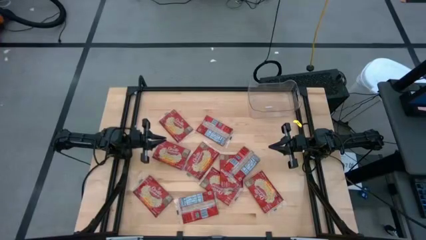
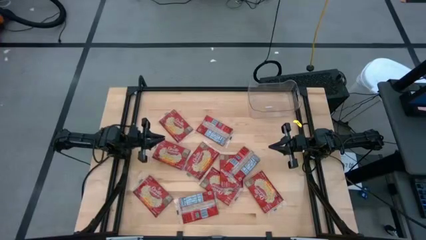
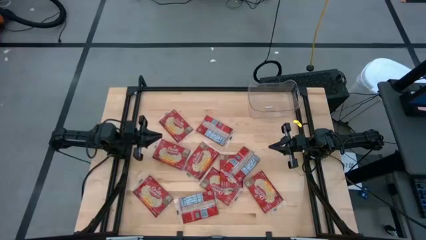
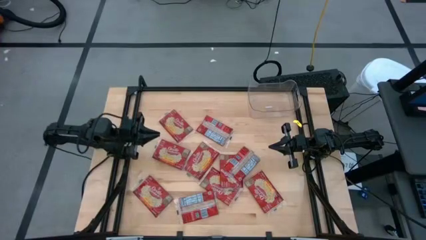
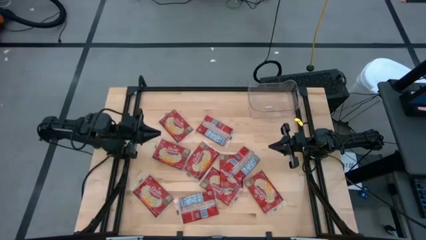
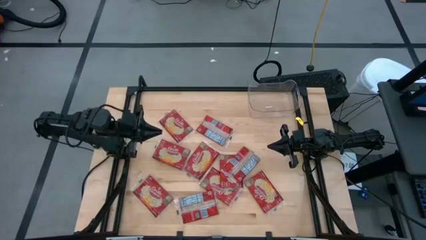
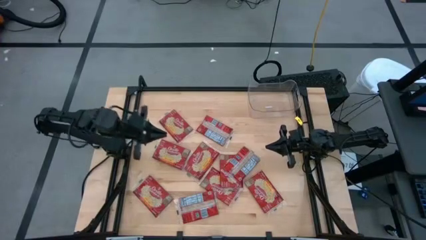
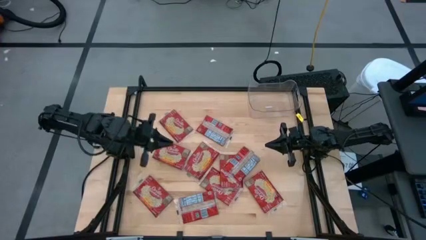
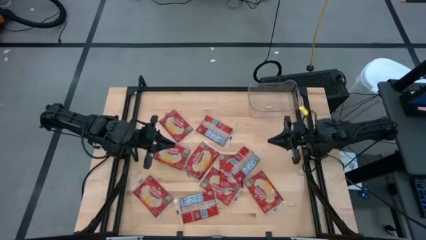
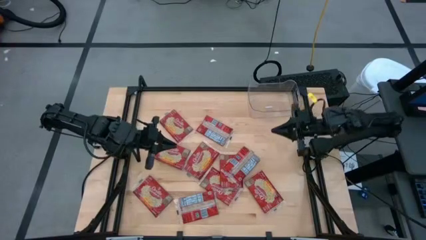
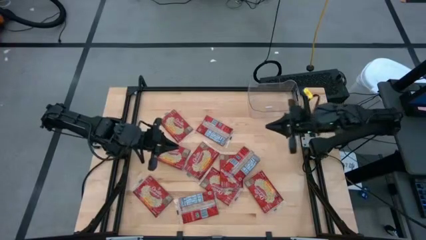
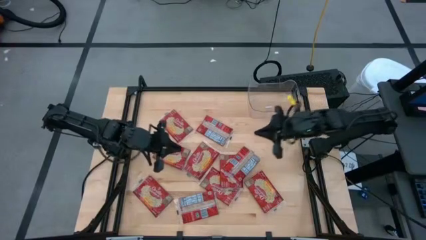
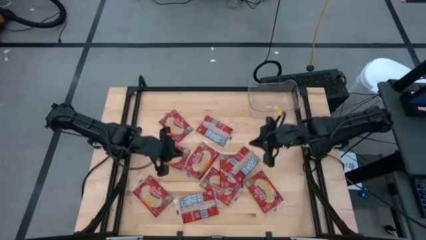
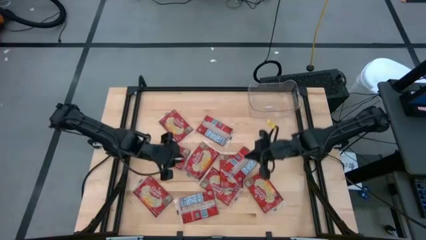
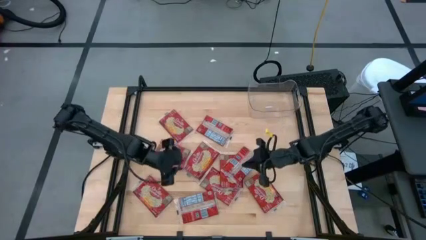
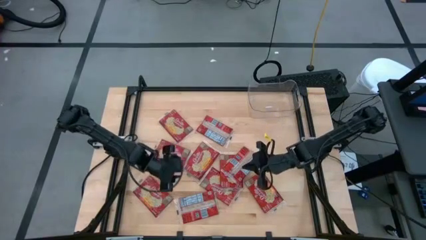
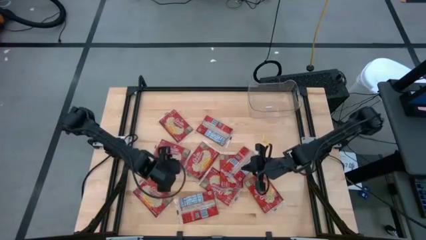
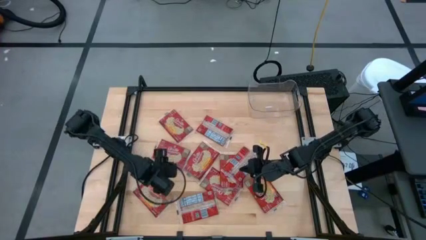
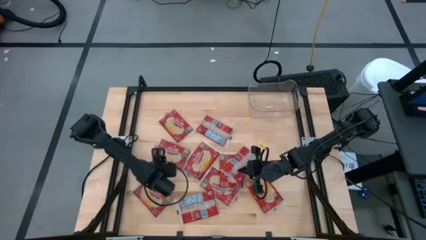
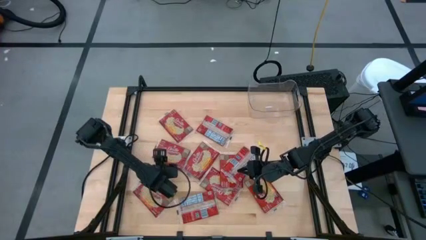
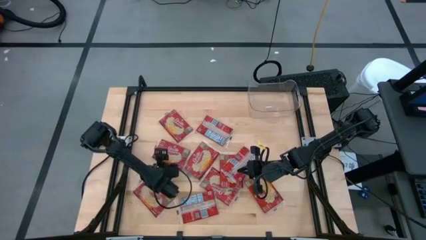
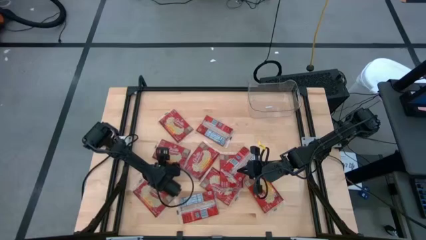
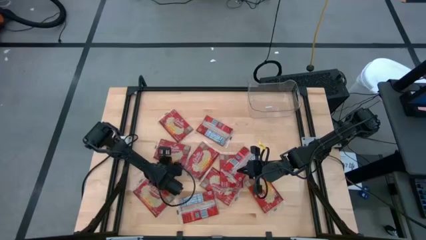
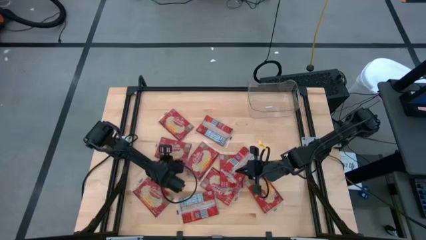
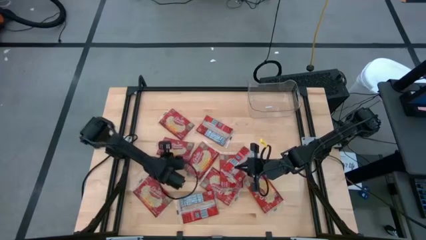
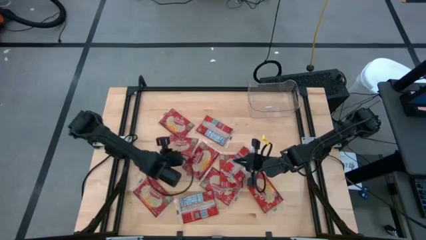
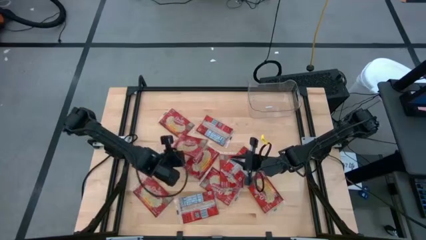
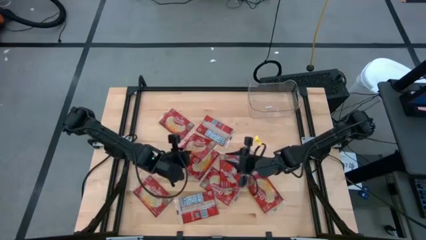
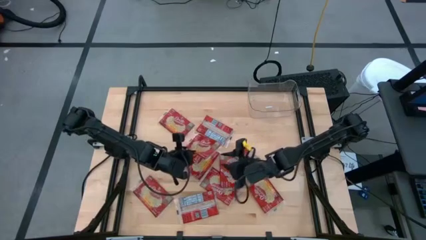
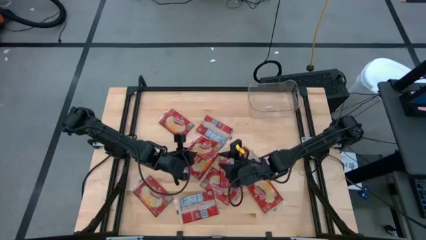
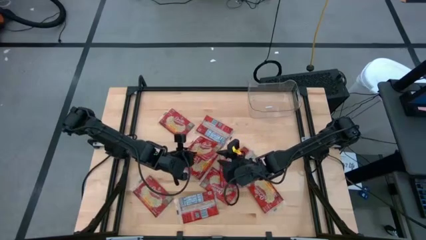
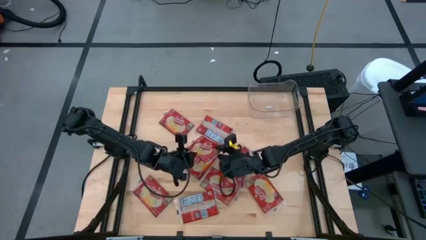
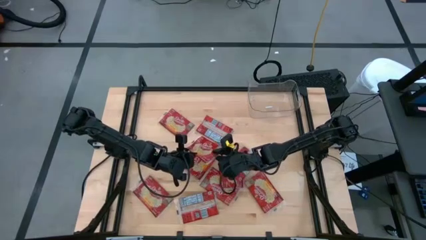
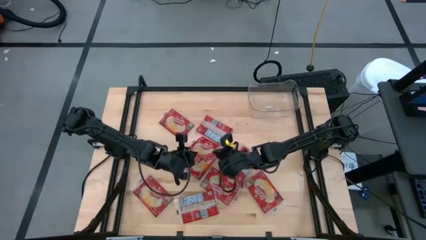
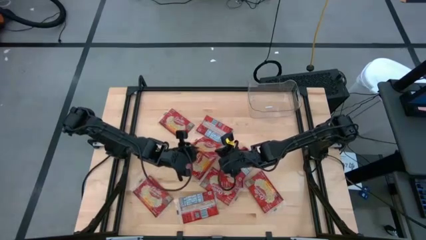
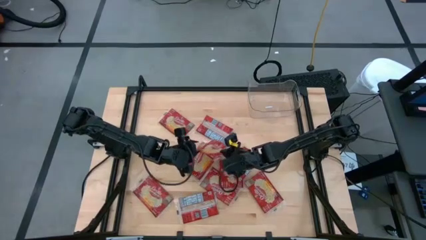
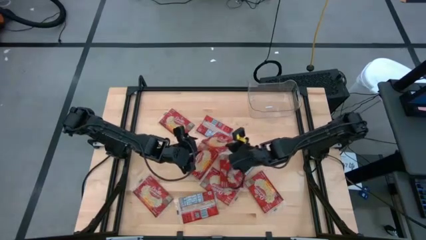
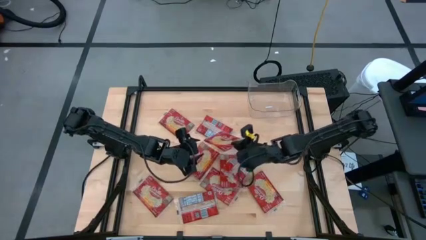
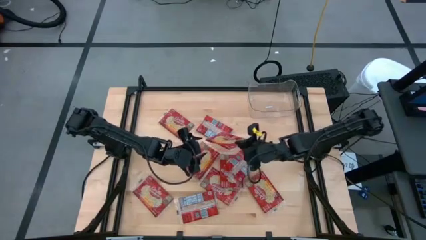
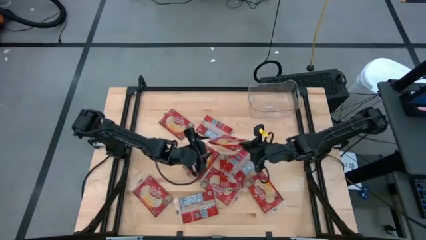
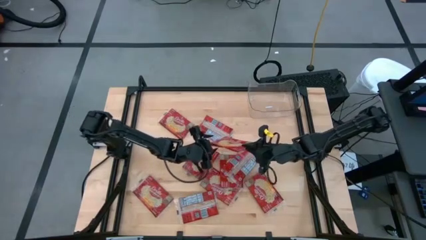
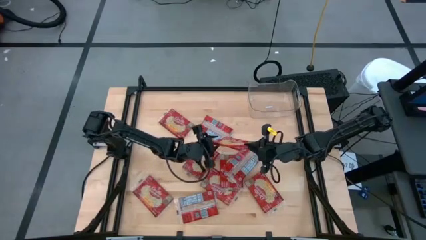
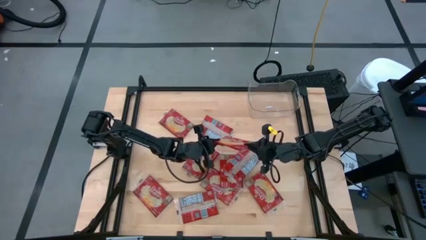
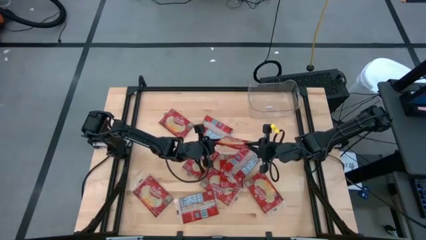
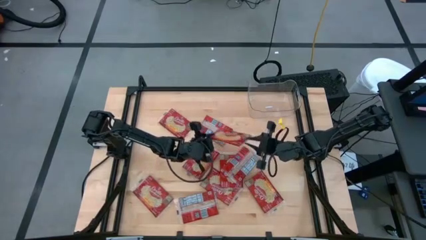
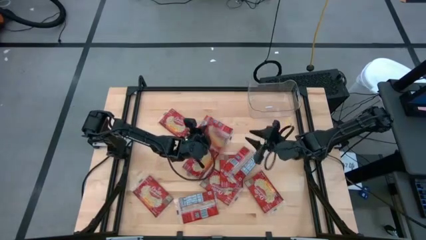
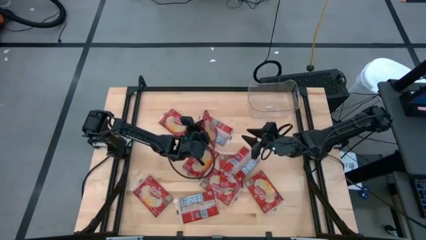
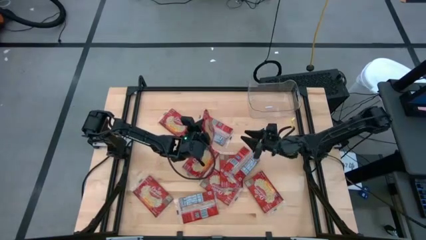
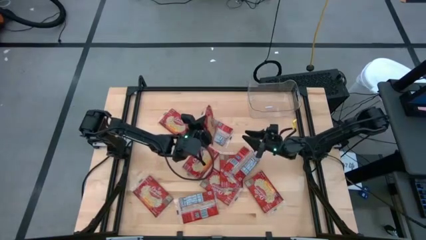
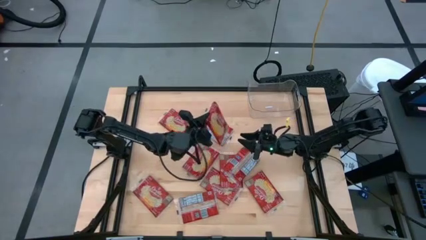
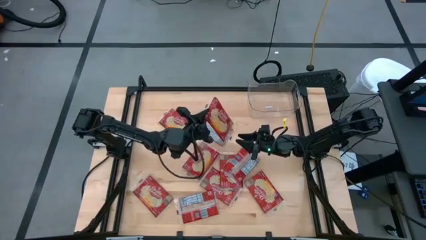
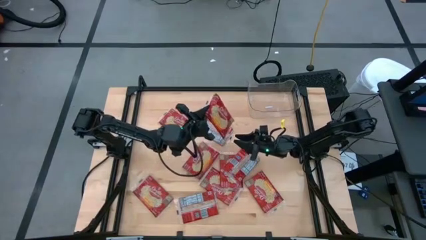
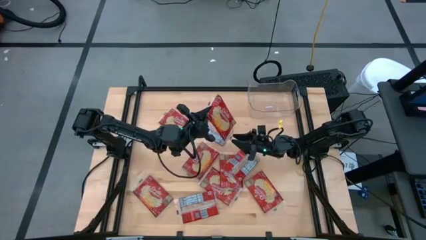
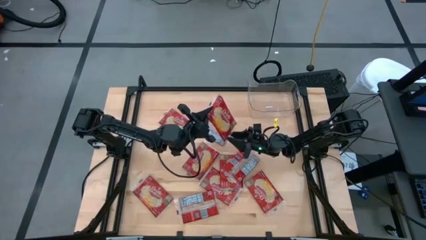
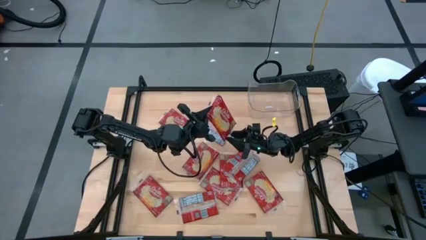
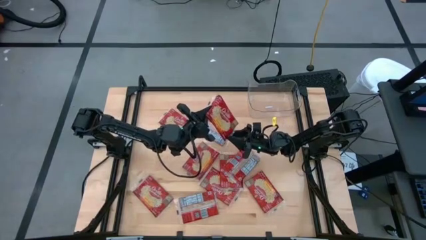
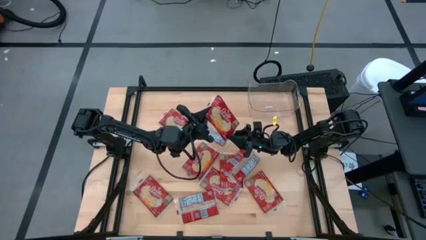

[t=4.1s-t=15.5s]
Task: Sort popcorn bags into baskets
Put the red popcorn bag into the transparent bin

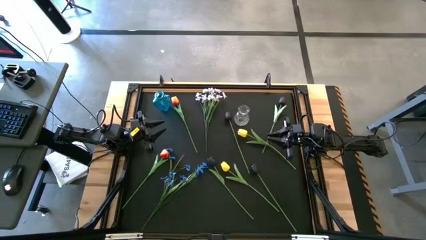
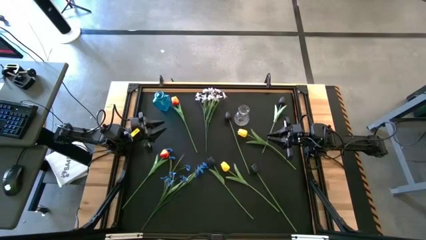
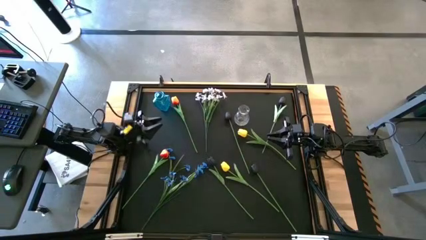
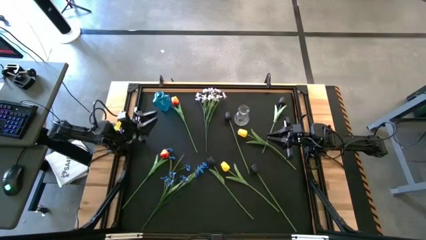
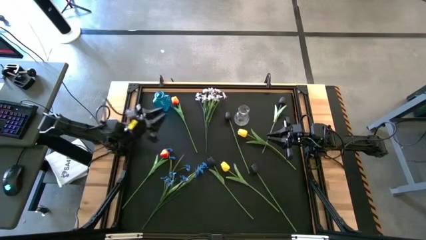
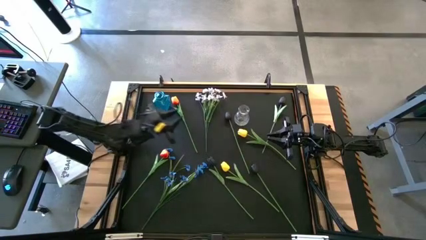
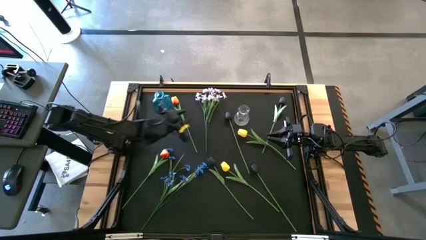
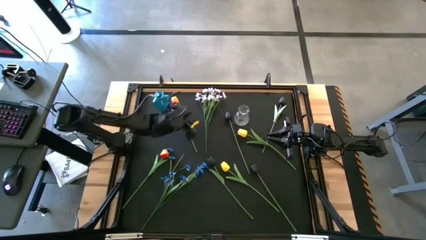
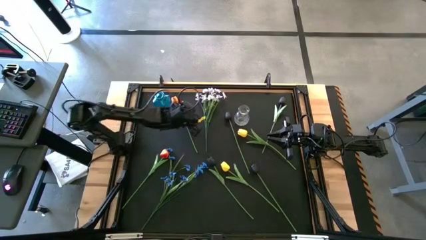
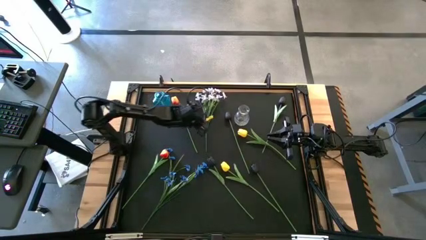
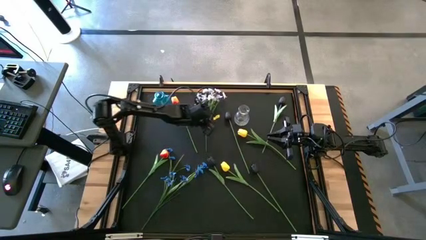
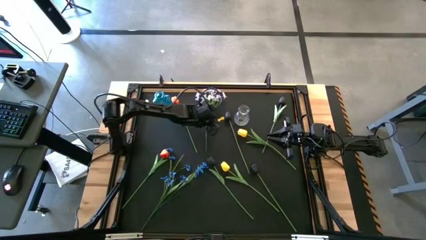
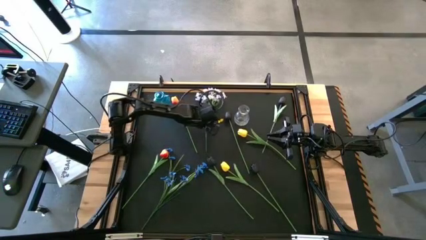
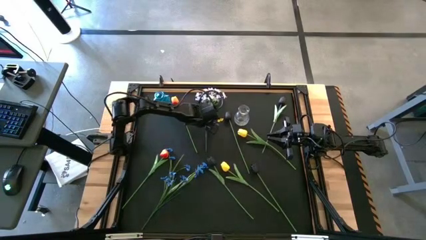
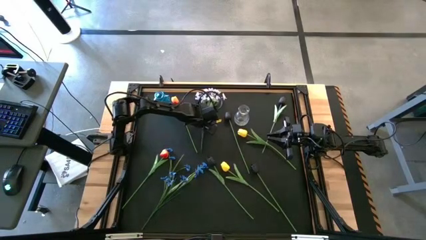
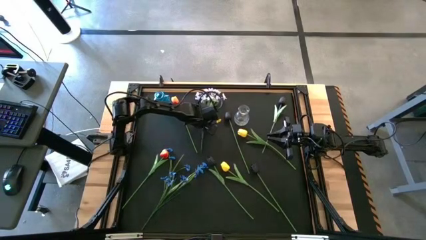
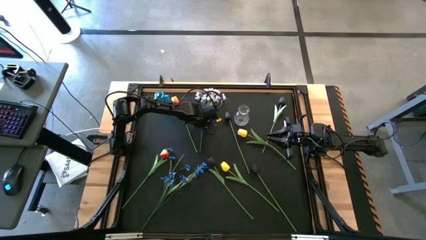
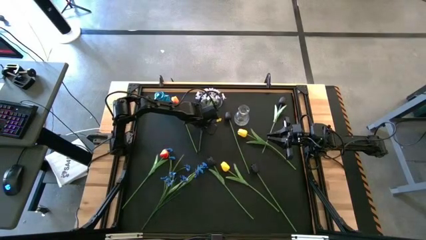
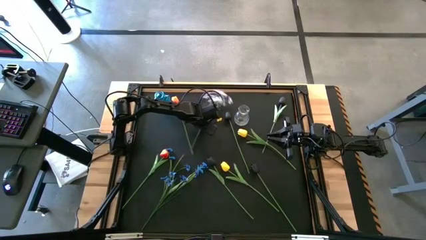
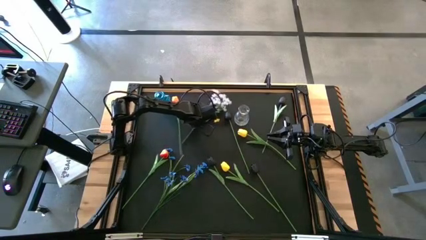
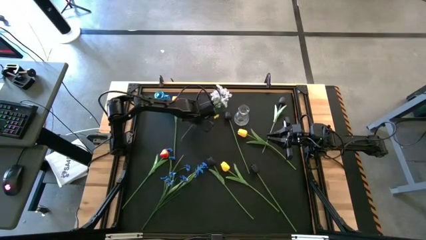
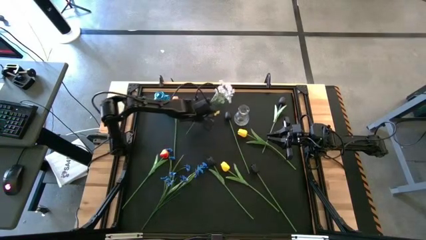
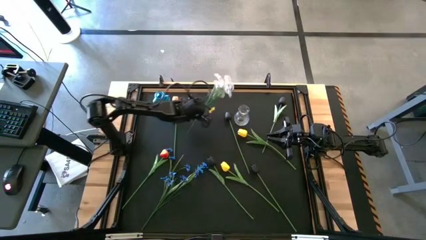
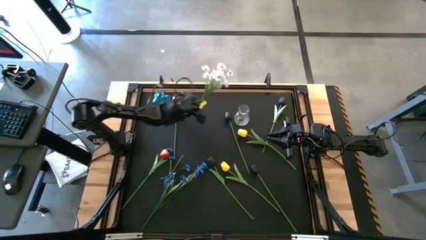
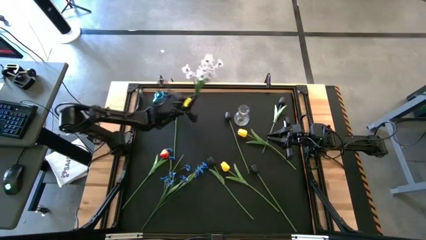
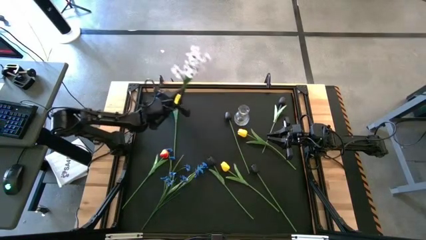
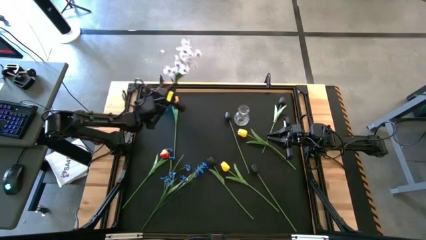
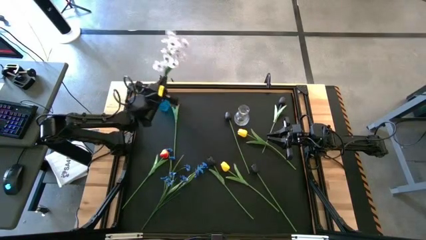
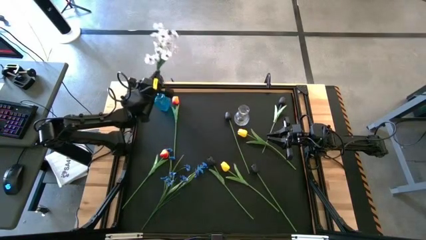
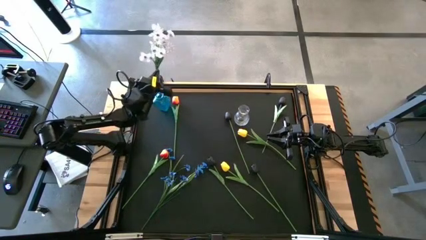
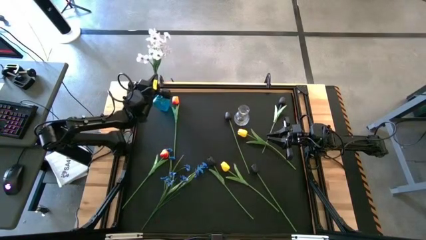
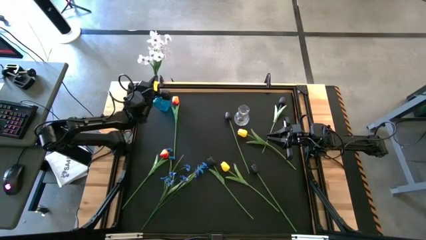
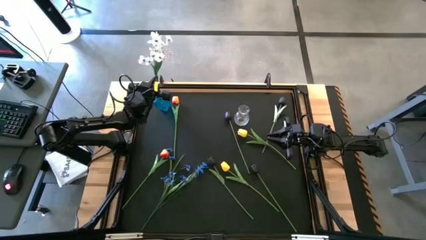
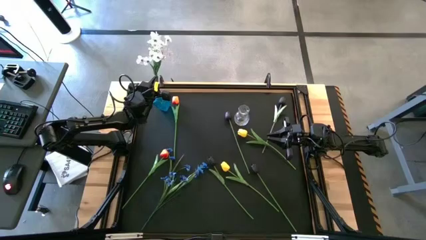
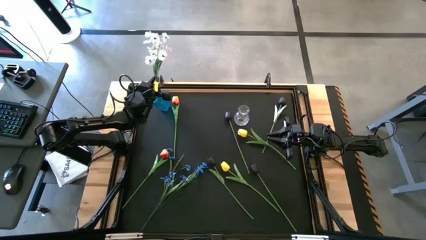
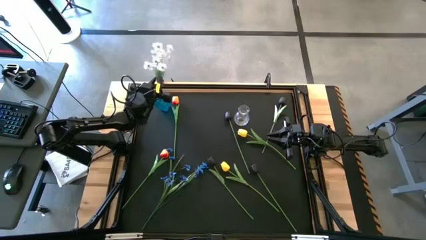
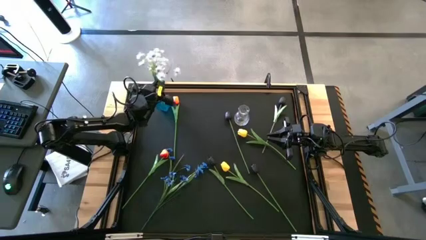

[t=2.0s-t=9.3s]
Task: Sort flowers into vase by color
Put the white flowers into the blue vase
